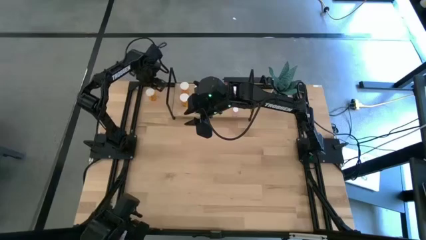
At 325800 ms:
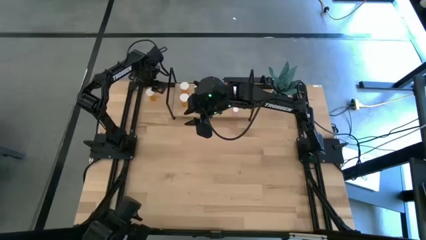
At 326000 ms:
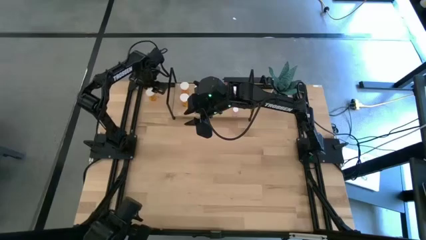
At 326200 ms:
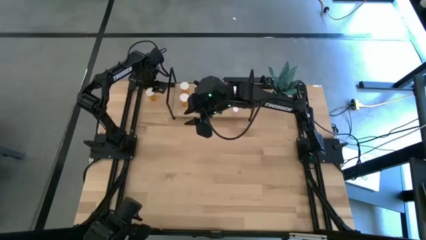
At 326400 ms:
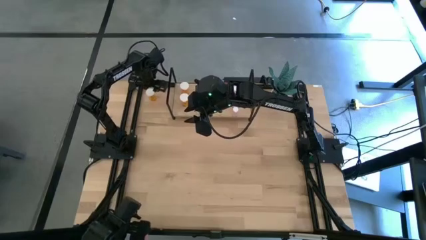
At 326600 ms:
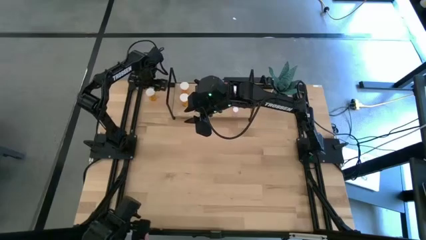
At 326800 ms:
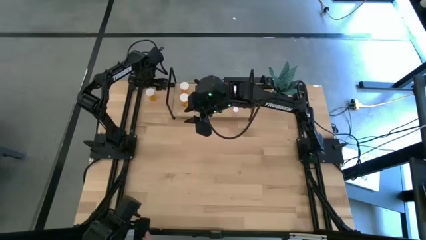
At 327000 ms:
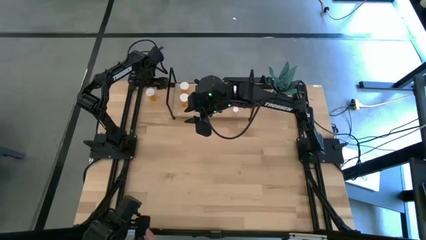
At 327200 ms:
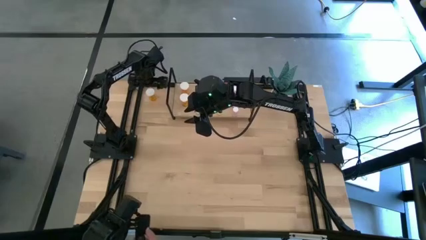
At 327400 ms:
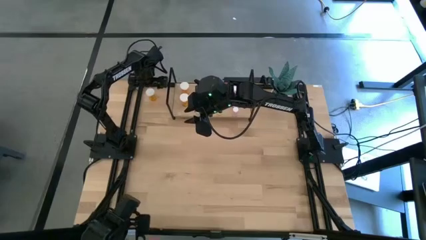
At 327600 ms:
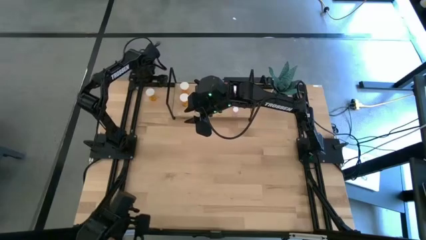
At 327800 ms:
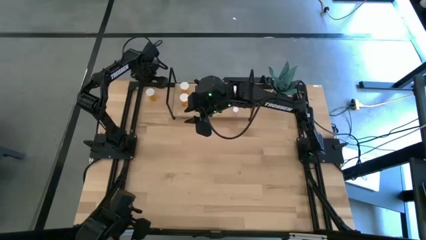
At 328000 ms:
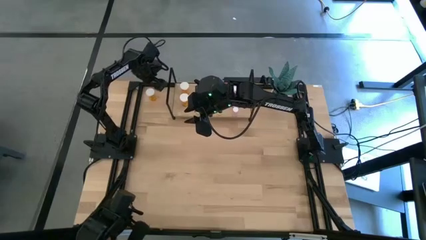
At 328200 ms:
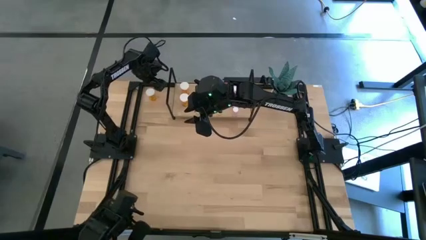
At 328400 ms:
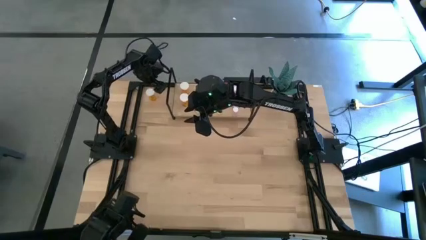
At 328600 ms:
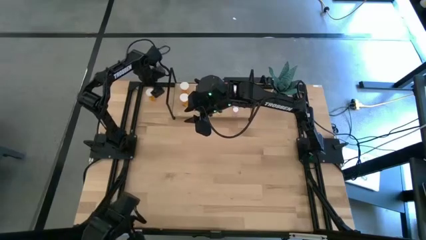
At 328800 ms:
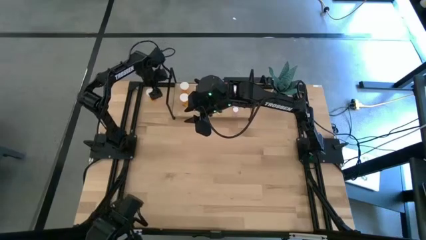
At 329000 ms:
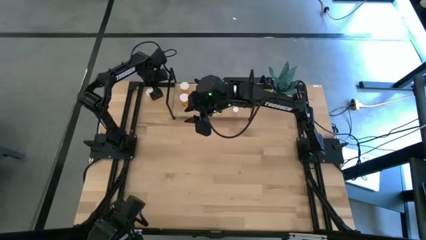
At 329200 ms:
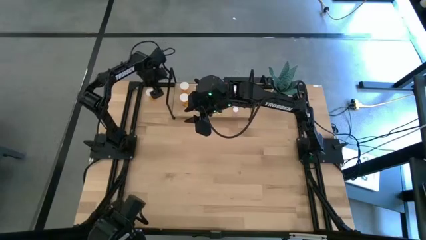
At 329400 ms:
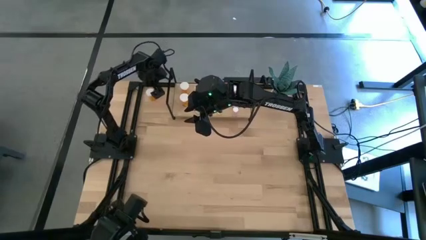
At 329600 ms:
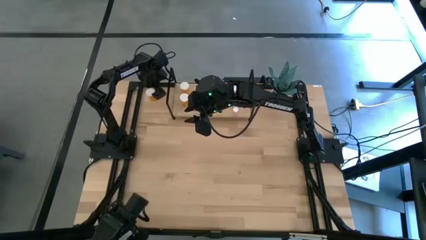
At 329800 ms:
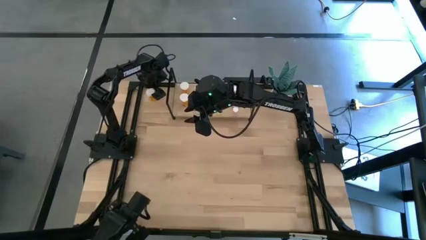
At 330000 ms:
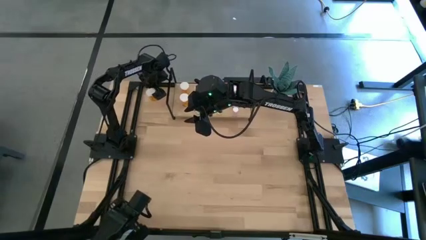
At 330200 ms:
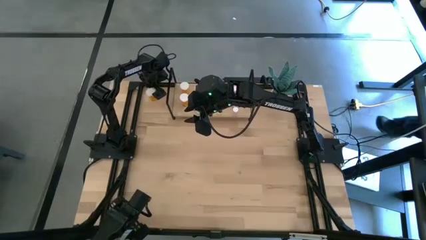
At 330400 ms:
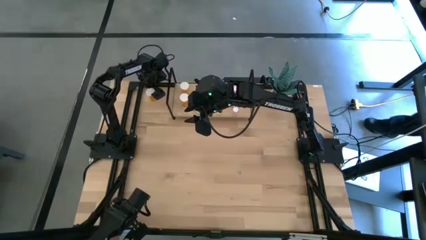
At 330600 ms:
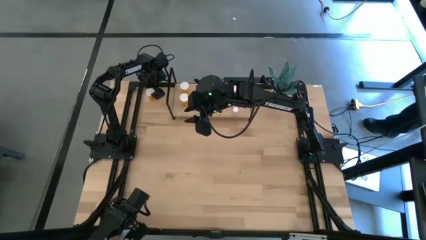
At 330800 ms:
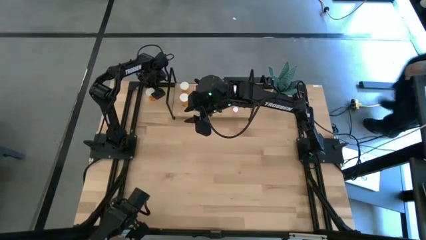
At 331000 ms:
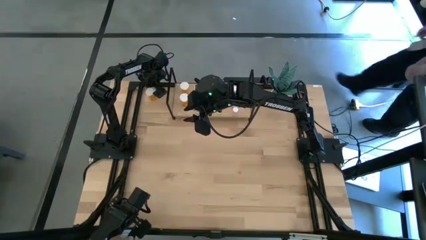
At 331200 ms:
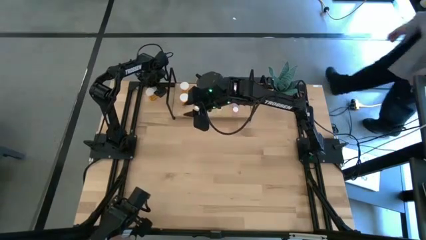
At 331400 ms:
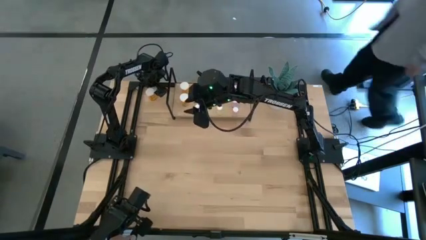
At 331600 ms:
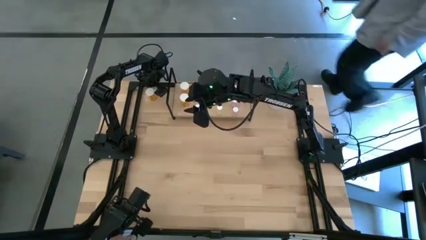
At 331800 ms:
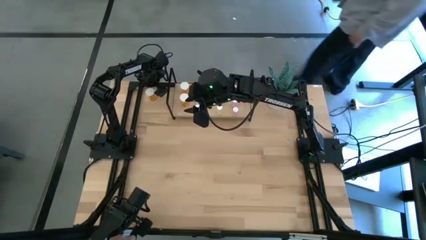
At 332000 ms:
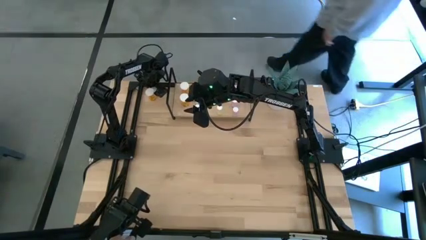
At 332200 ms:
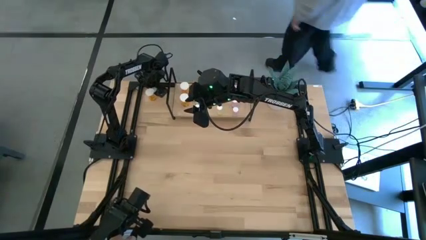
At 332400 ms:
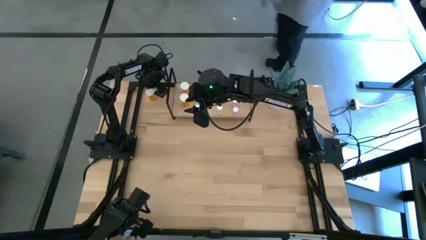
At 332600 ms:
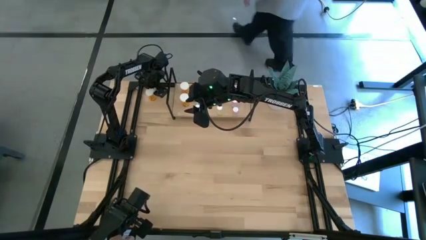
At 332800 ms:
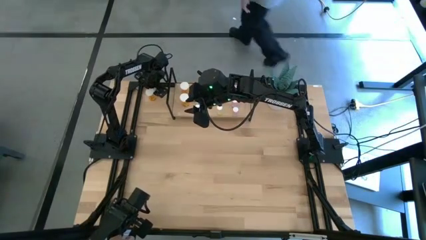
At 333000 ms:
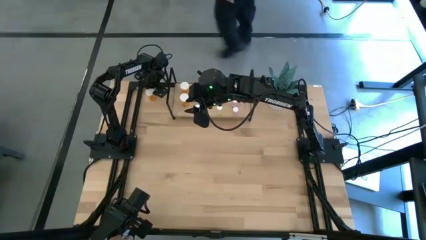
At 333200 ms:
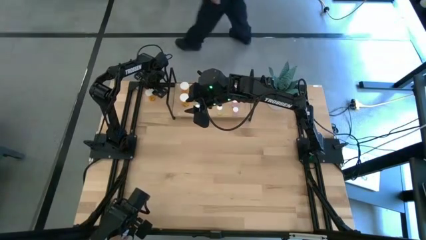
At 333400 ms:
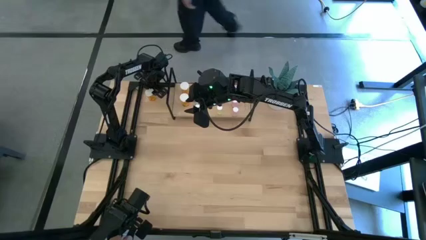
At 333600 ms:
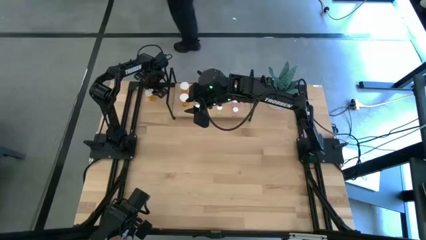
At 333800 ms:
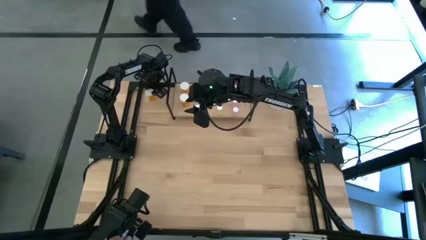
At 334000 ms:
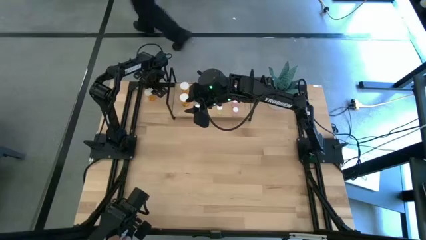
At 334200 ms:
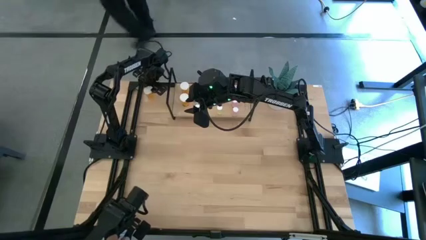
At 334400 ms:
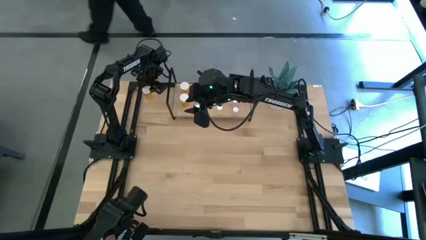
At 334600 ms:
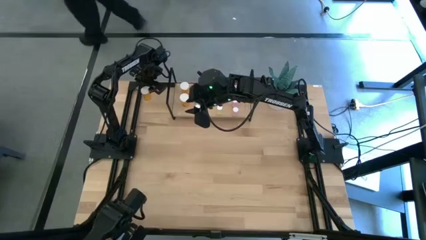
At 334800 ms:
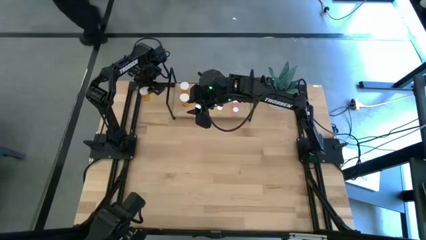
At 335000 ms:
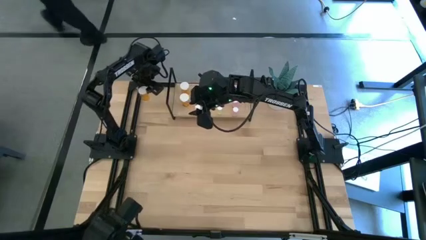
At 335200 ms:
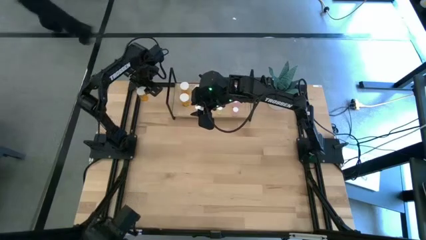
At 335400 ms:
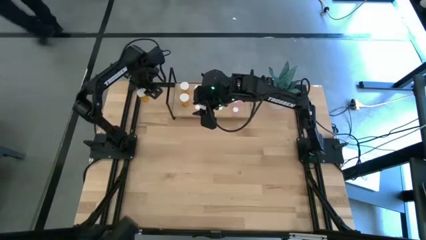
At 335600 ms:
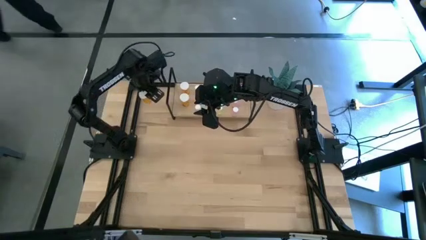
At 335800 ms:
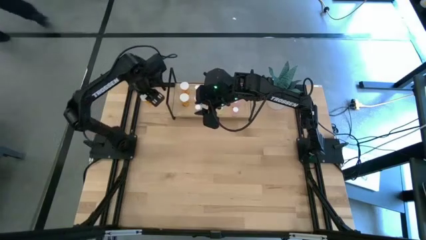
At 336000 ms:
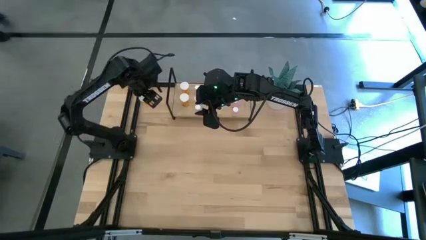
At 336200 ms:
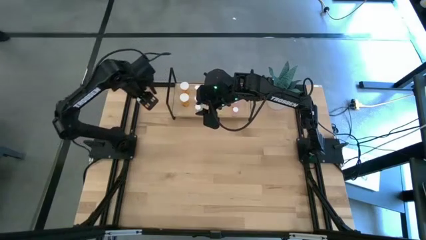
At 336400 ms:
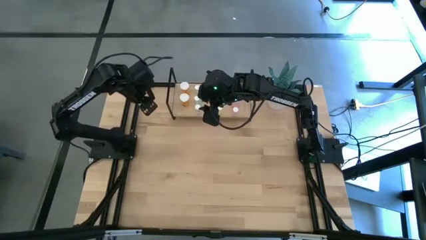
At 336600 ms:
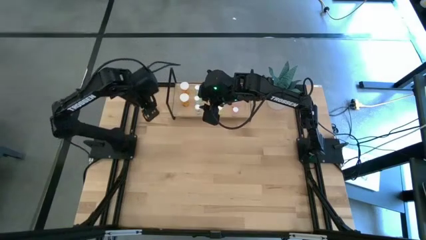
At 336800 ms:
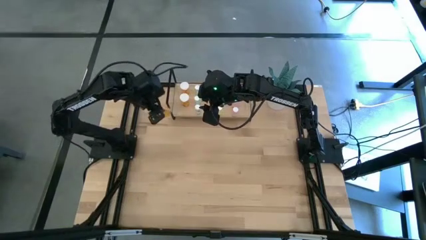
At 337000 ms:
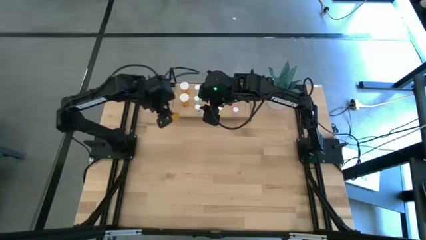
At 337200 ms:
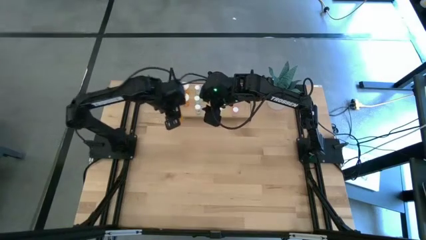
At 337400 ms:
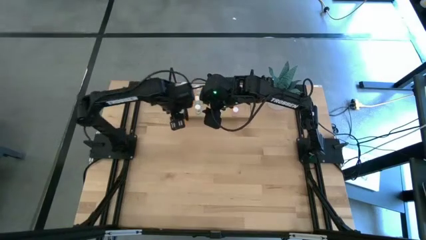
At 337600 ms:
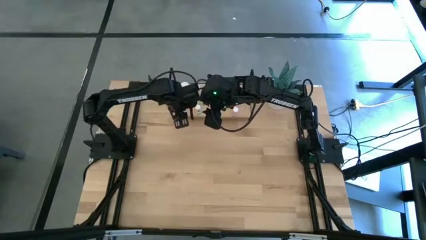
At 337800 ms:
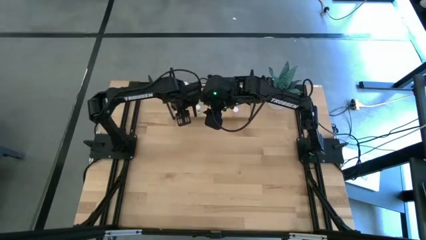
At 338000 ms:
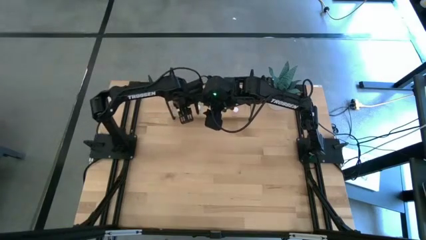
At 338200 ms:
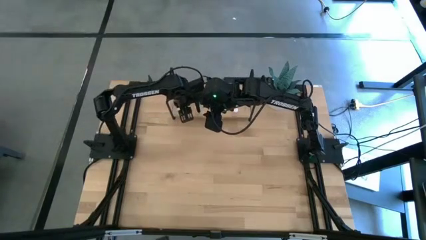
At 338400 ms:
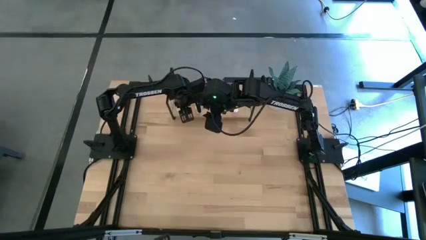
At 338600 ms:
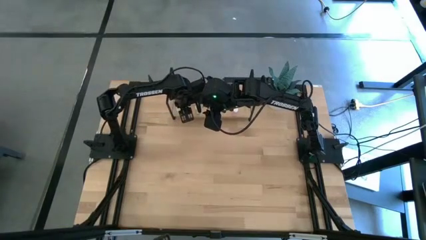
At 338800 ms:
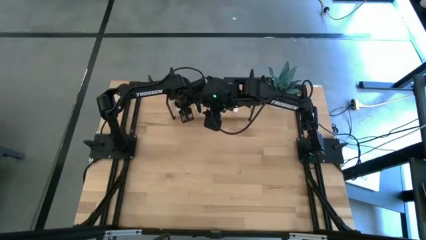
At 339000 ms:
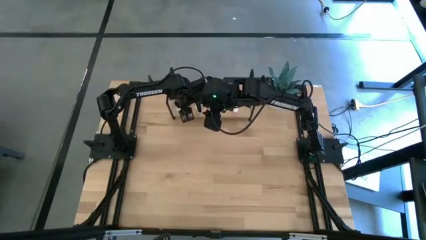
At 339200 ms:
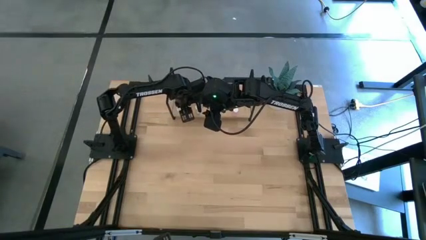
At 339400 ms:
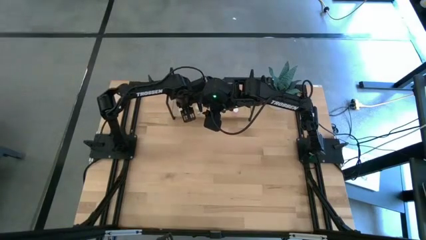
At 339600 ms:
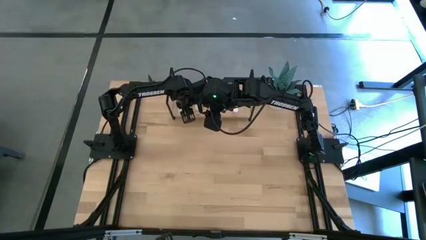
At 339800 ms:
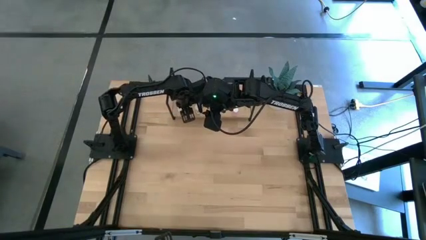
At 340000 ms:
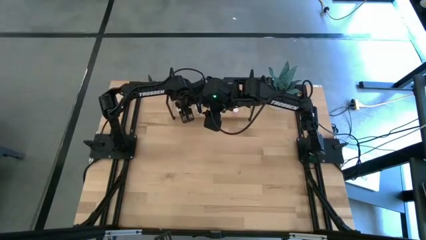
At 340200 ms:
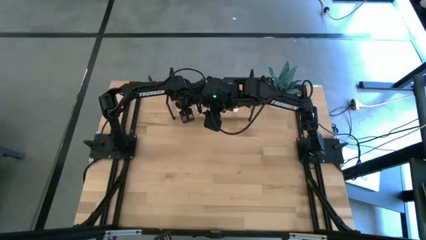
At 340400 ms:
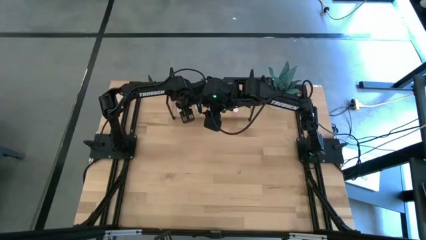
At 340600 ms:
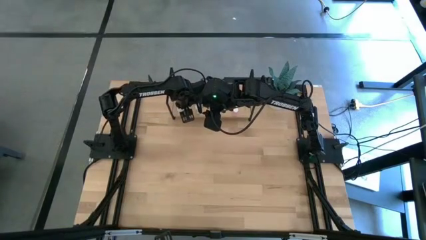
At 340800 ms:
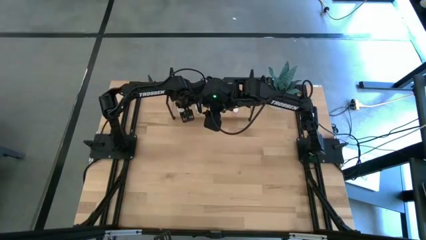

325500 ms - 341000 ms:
Task: Pick and place medicine bottles onto shelf by color
Put the orange pill bottle on the shelf aligned with the other orange pill bottles
